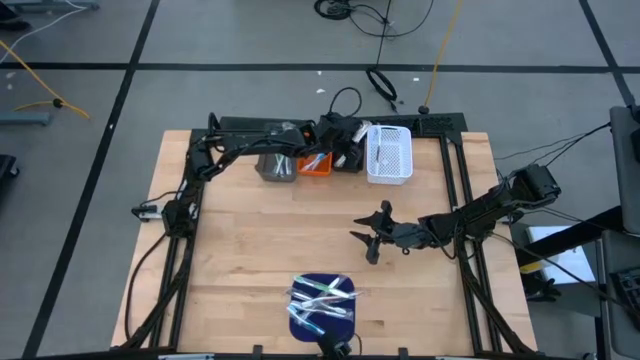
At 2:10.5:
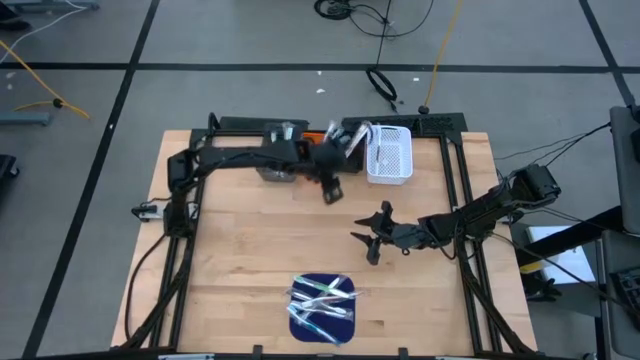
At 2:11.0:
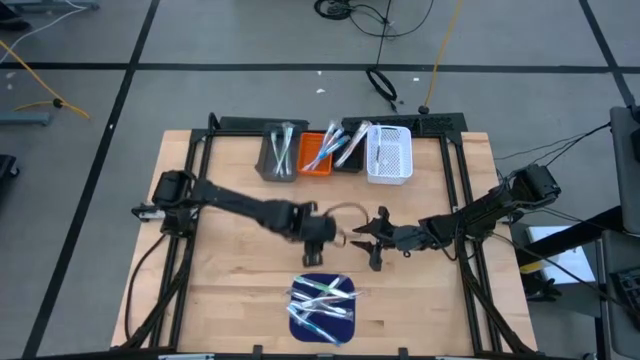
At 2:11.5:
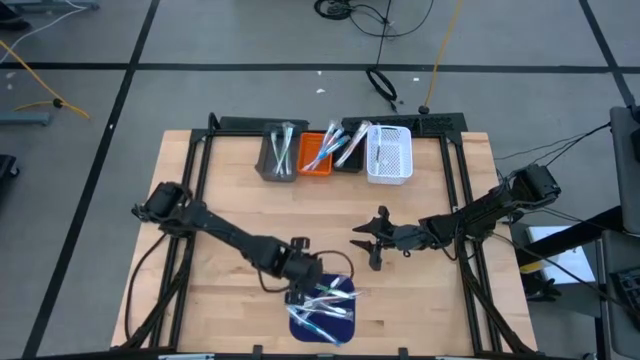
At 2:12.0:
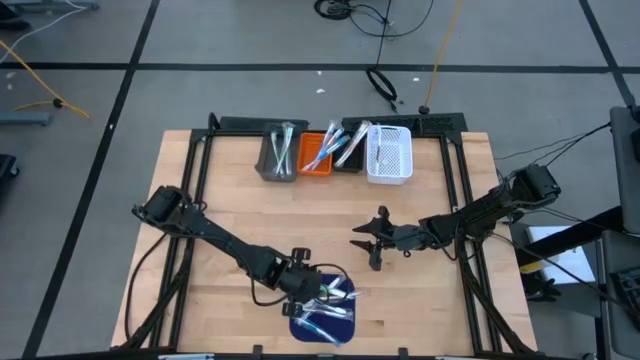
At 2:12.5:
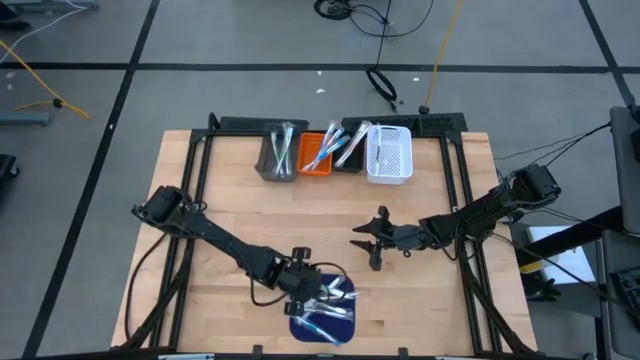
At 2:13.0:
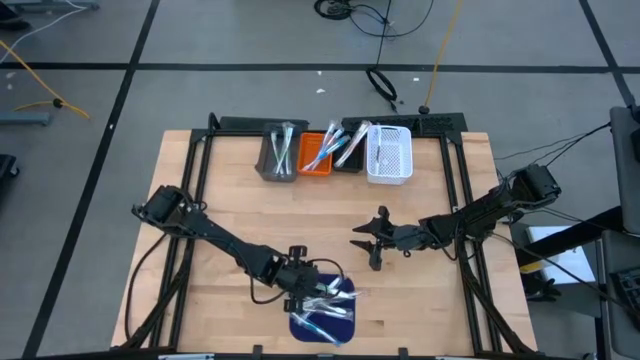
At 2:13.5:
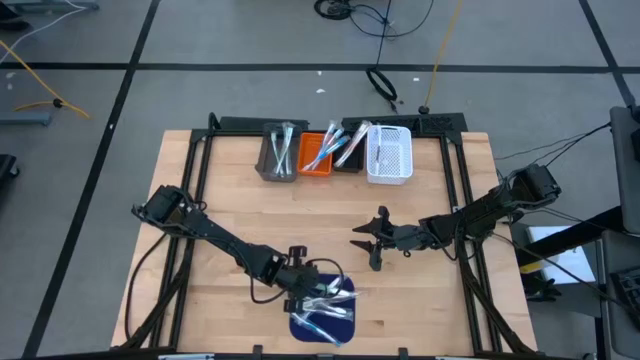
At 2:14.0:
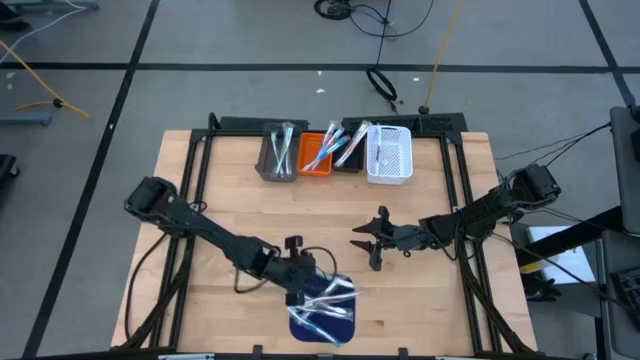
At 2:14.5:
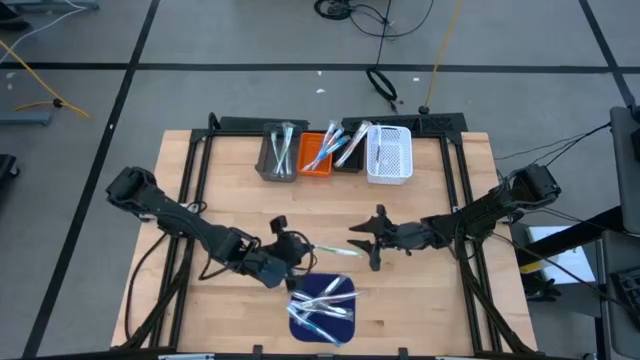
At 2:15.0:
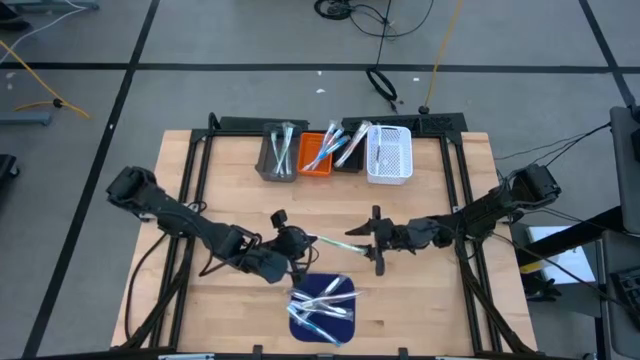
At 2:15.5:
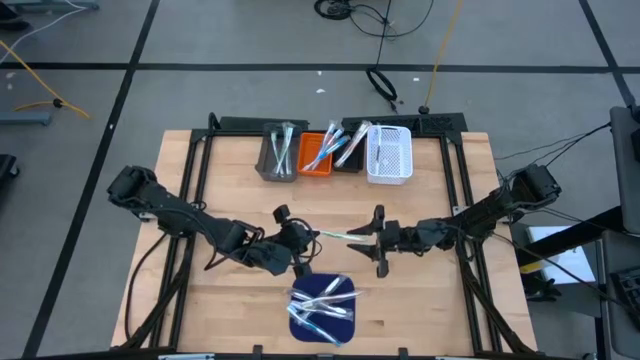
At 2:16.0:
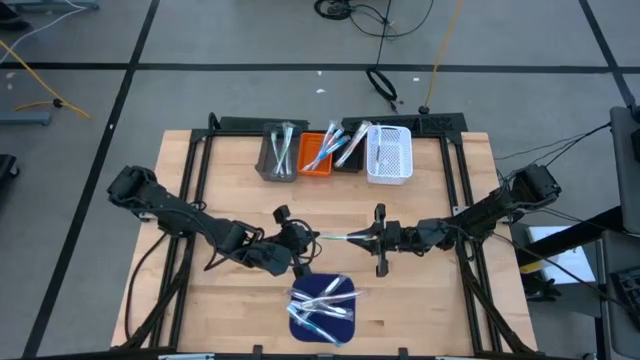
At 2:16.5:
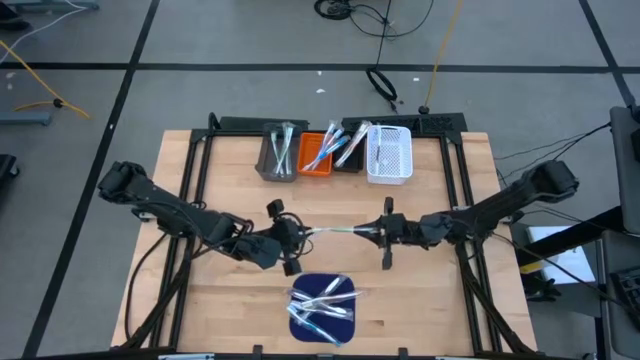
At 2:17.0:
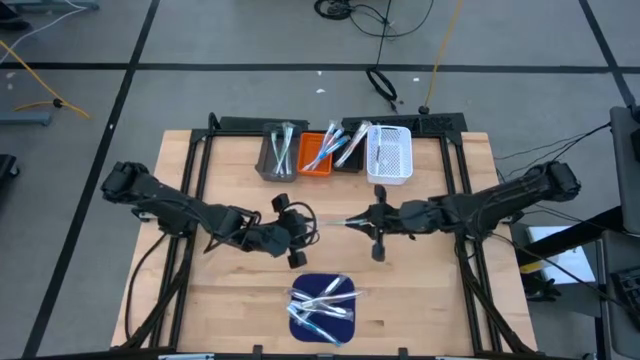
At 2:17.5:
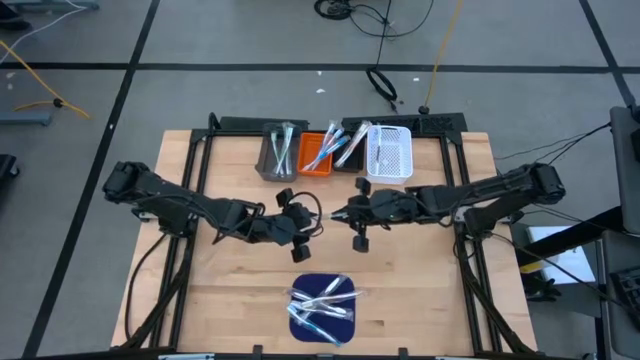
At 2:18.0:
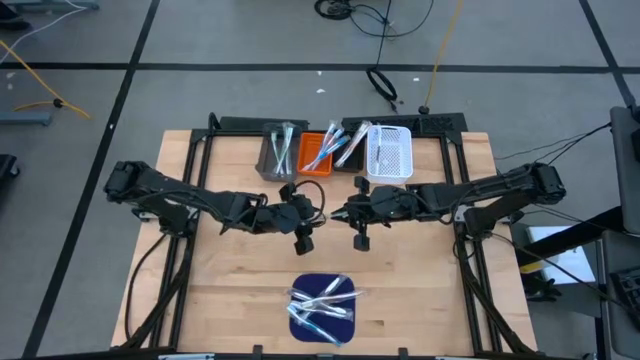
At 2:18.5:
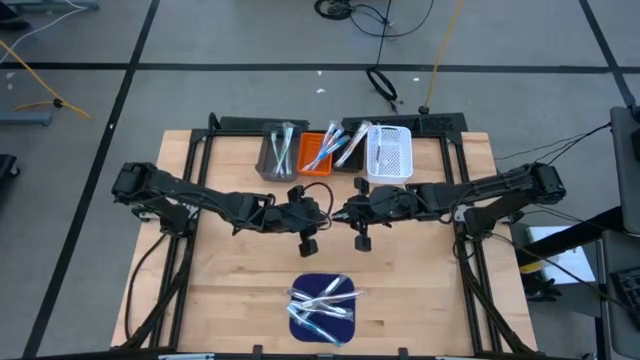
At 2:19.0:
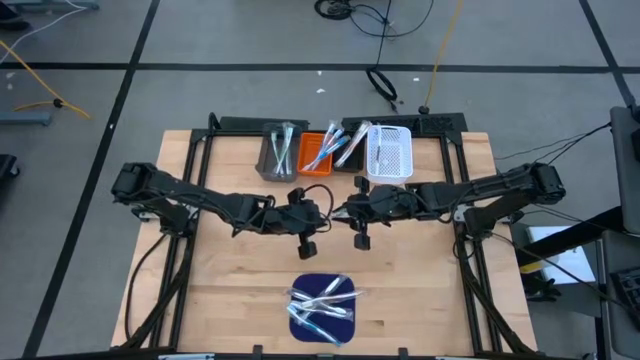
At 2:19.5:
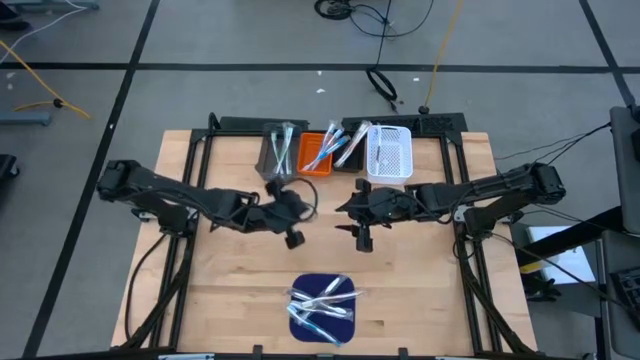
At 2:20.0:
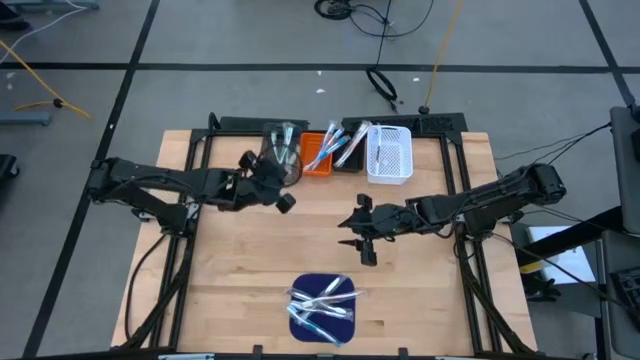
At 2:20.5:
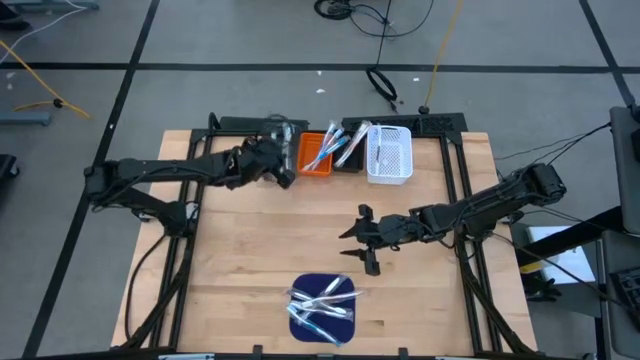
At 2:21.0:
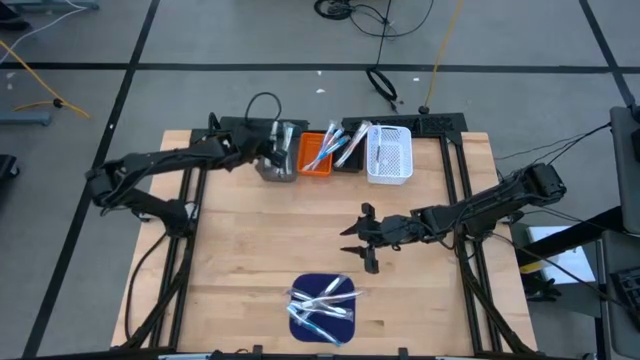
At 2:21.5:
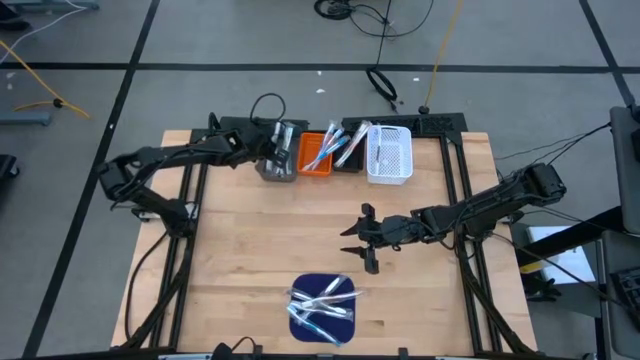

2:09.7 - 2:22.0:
Task: Pick & Place Toothbrushes
Put the green toothbrush into the light black bin

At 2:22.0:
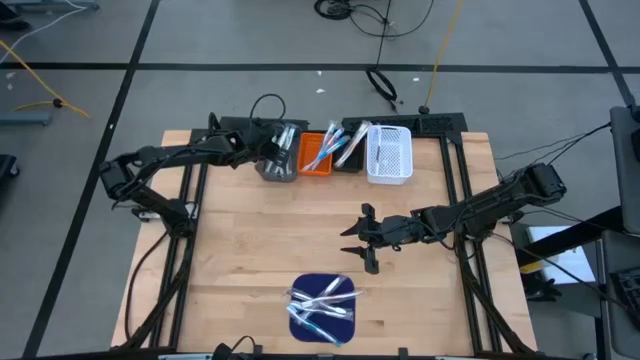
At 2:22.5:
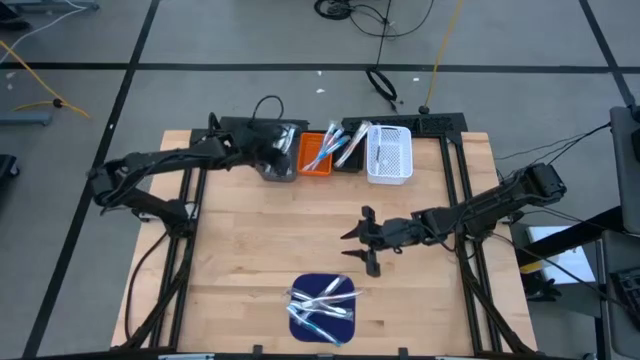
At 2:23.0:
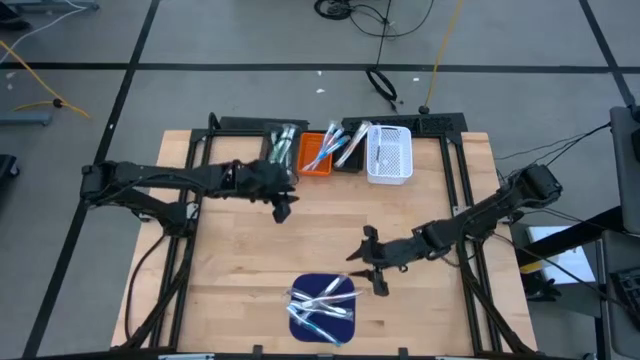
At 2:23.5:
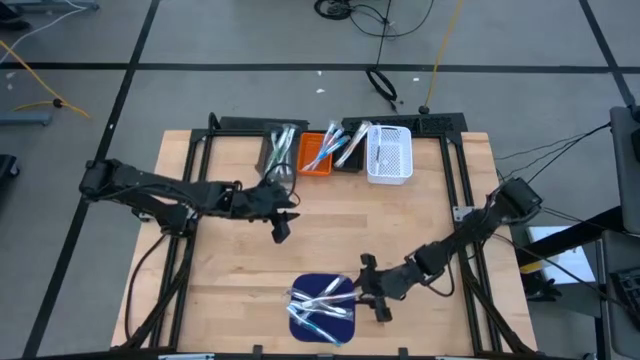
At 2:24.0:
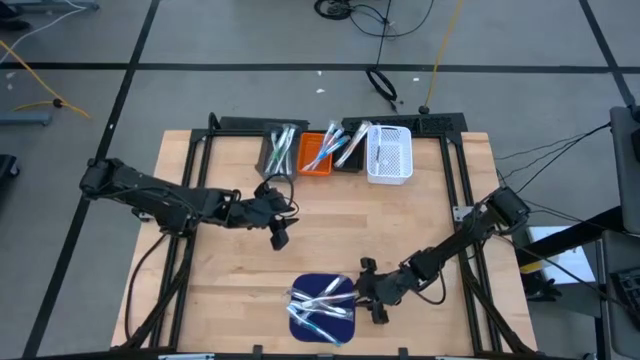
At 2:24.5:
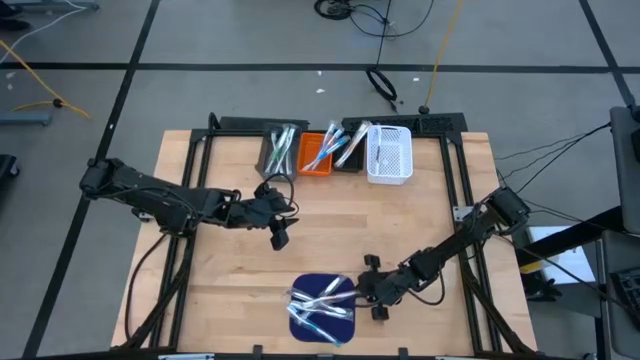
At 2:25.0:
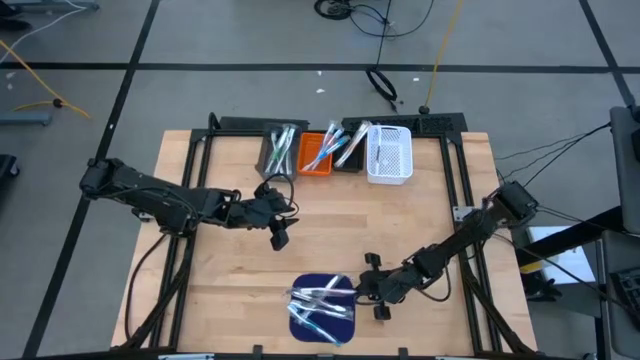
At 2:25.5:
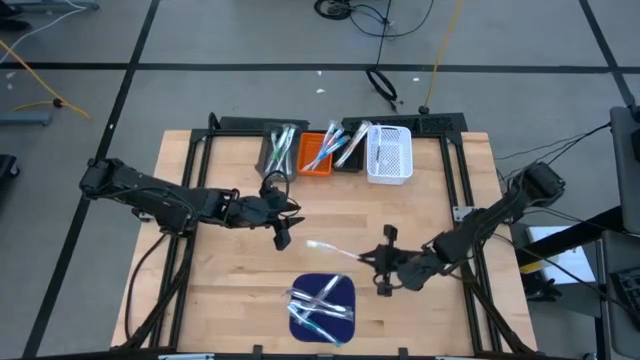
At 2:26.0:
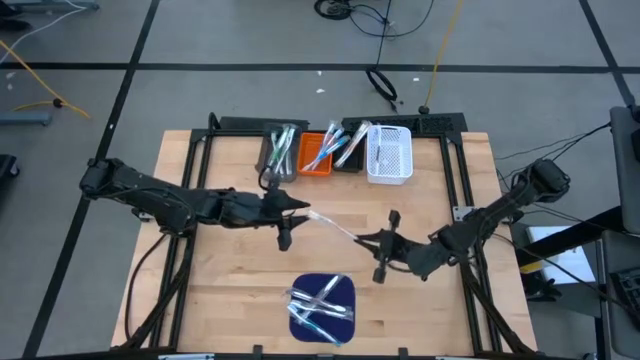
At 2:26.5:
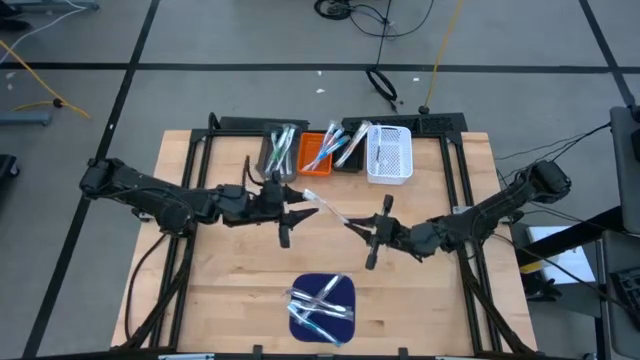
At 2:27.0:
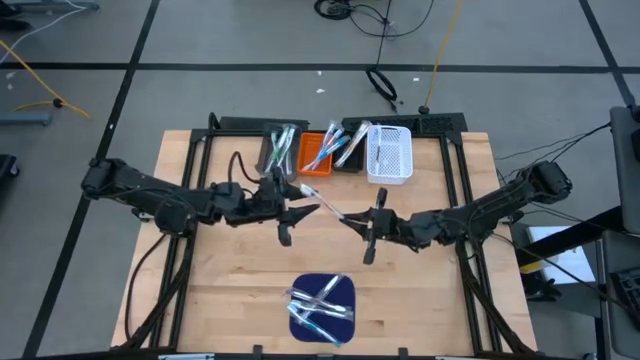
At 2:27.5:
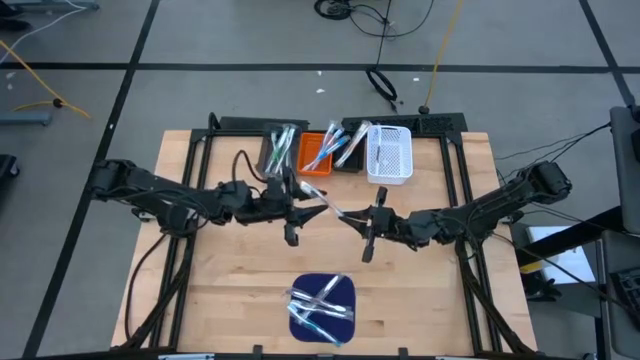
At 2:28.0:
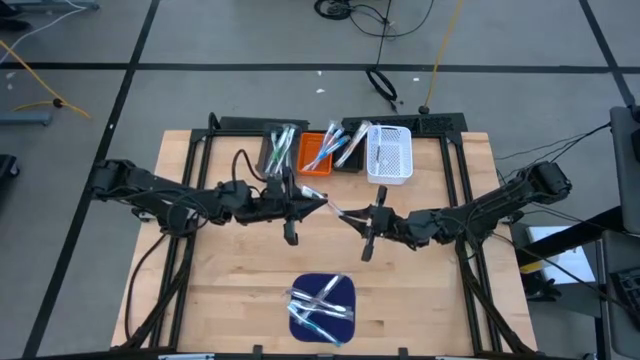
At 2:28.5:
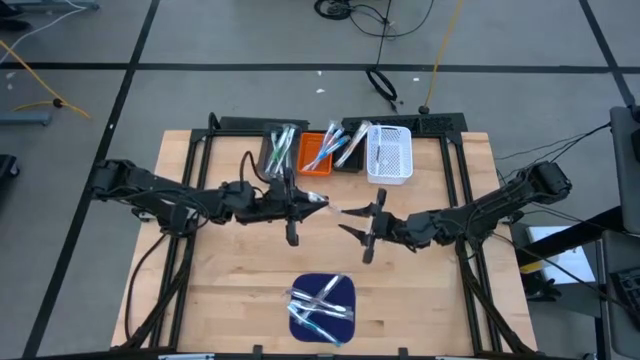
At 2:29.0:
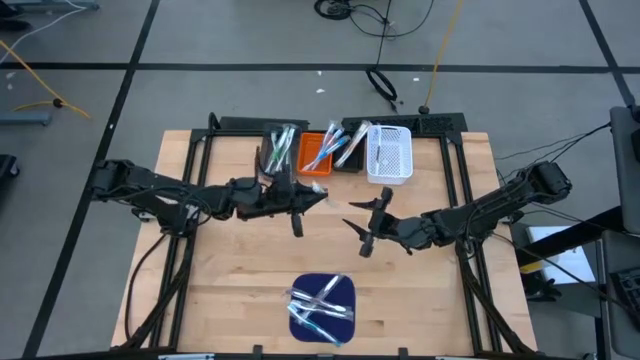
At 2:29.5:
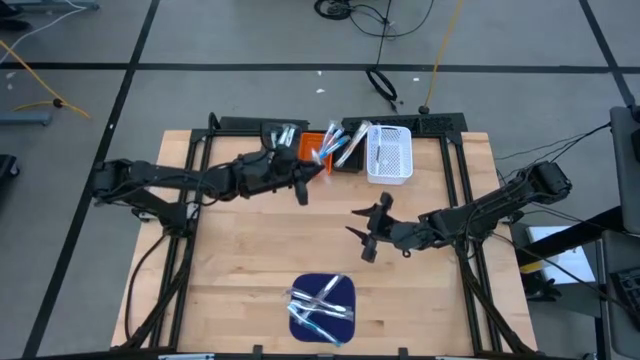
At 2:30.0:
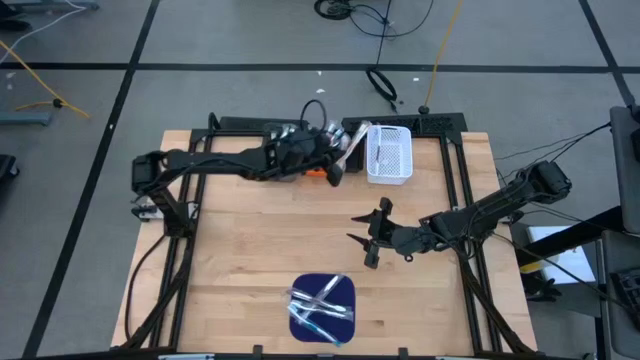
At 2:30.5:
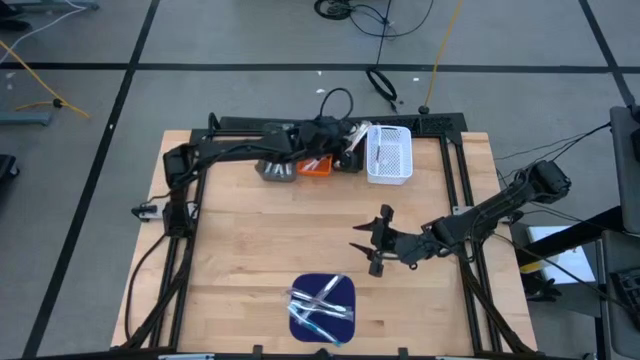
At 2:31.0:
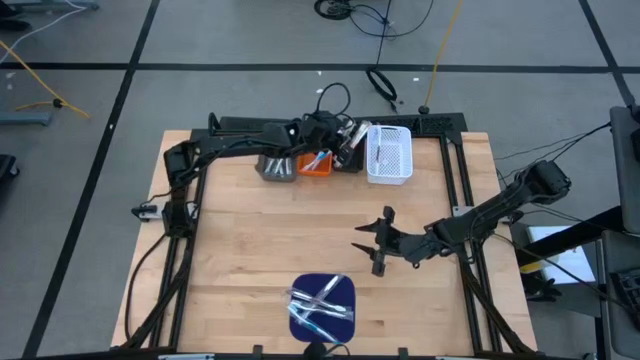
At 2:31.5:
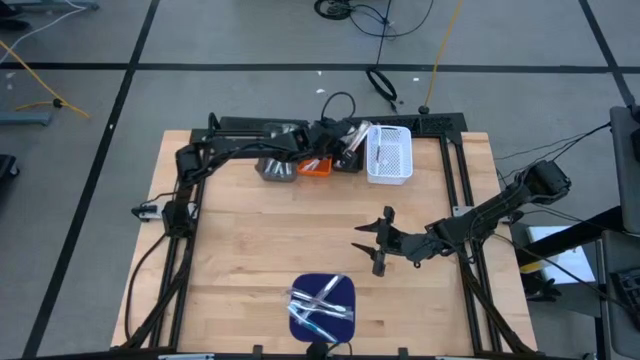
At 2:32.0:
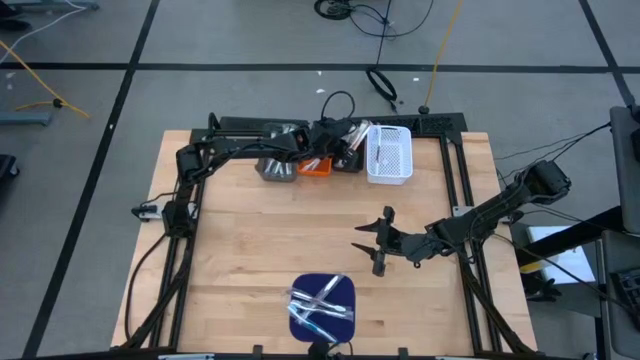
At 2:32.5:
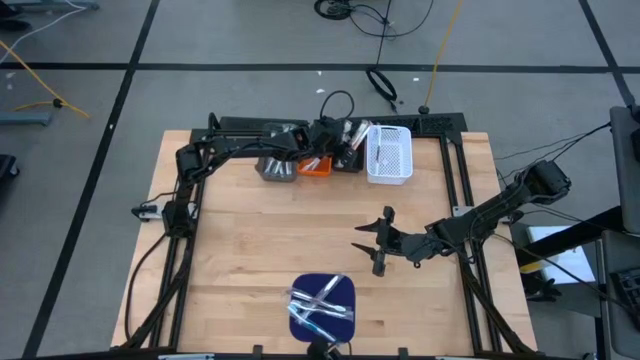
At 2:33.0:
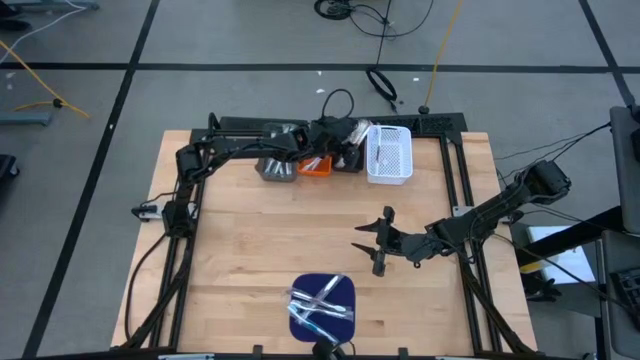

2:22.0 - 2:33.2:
Put the blue toothbrush into the orange bin
